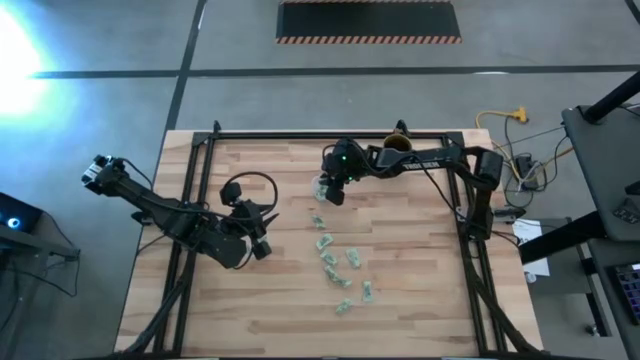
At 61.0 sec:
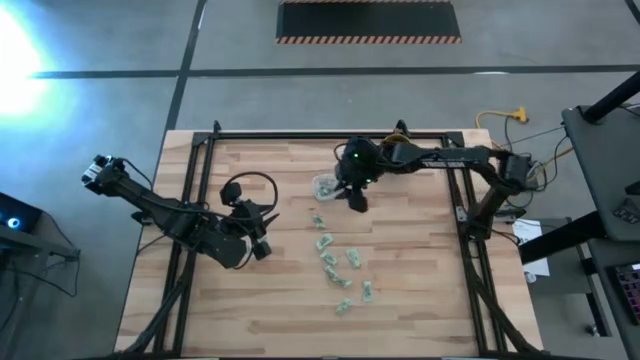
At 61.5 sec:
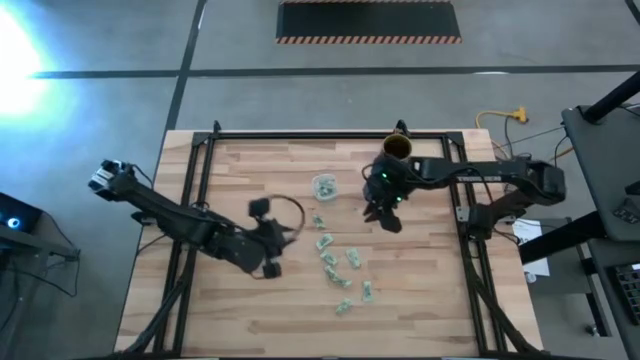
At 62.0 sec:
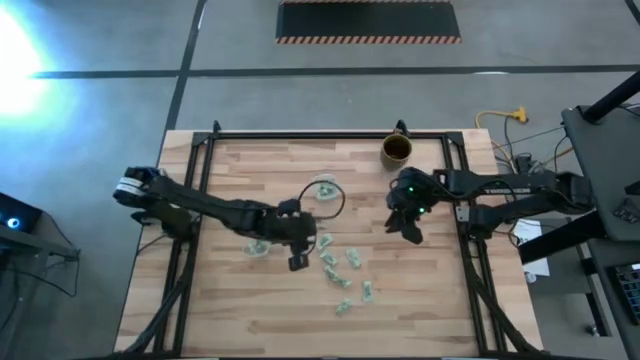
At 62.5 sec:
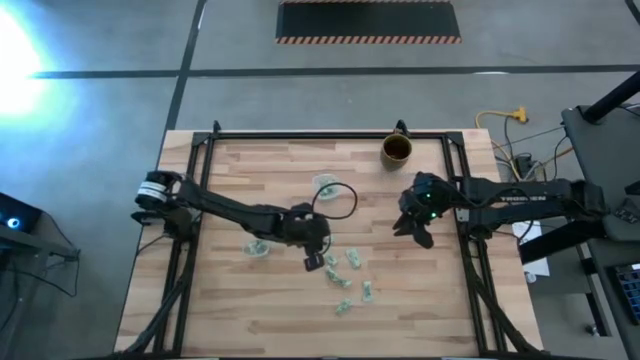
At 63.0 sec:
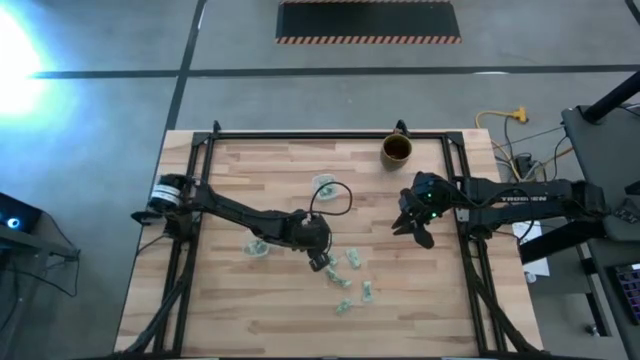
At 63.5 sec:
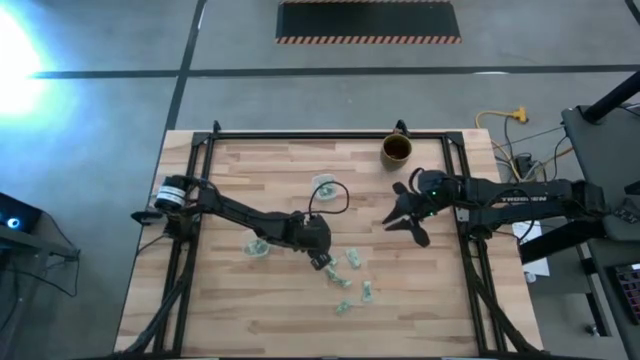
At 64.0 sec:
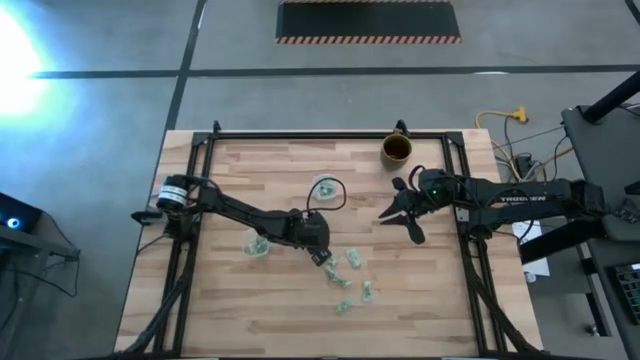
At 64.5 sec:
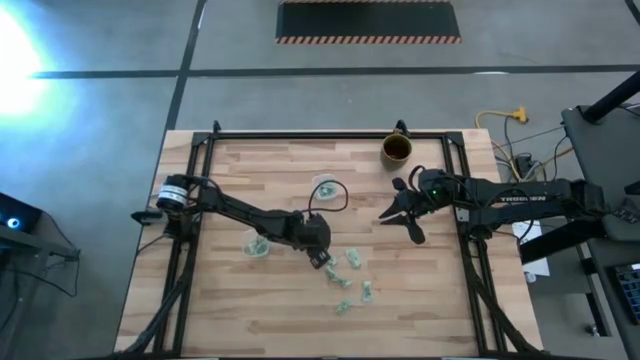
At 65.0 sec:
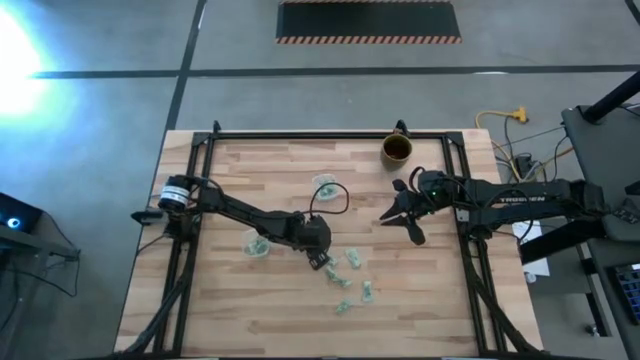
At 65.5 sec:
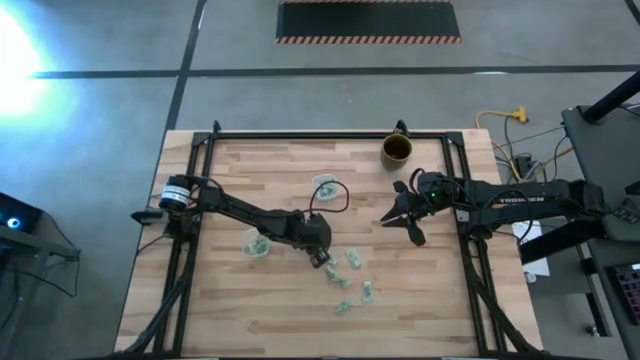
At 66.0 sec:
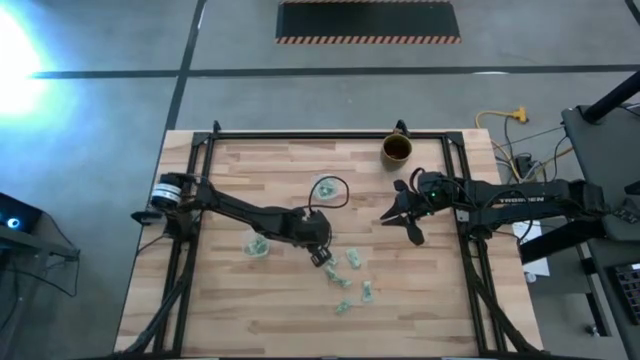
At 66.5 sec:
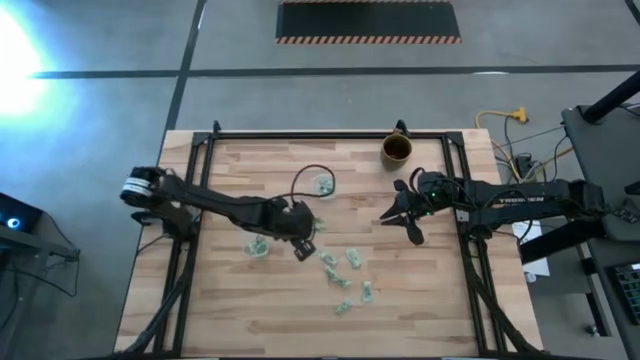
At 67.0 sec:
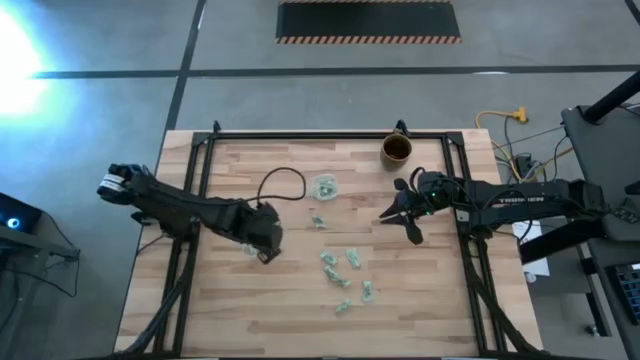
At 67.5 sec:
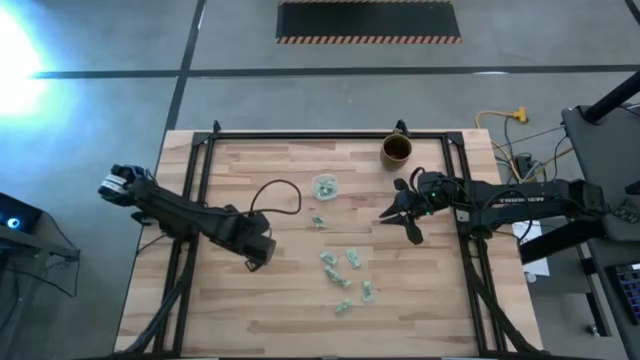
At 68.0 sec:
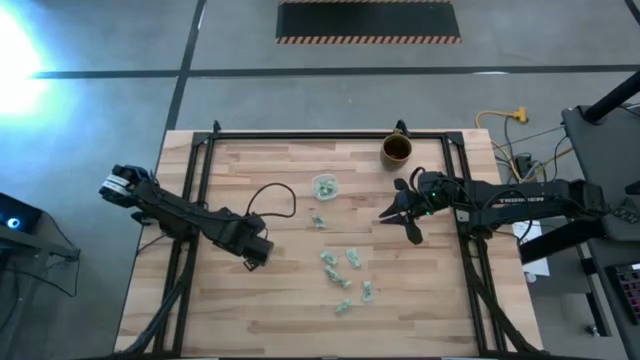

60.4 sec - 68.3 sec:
Task: Pick and place Stevia / Truvia into bins
Put the stevia packet into the bottom transparent container

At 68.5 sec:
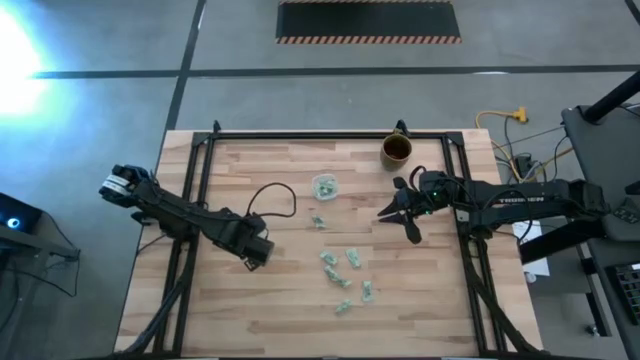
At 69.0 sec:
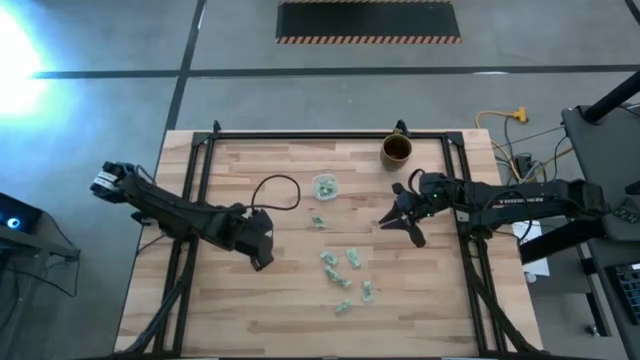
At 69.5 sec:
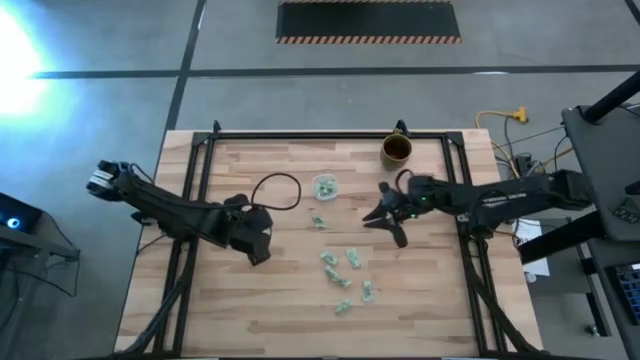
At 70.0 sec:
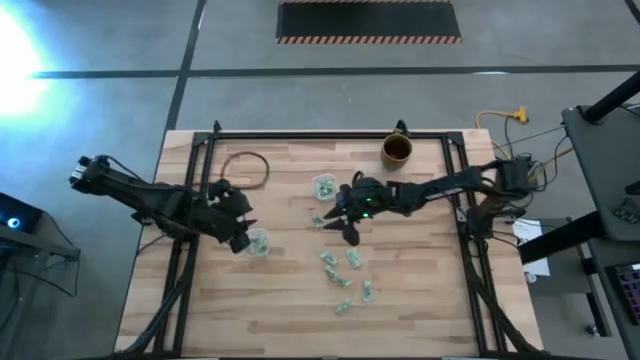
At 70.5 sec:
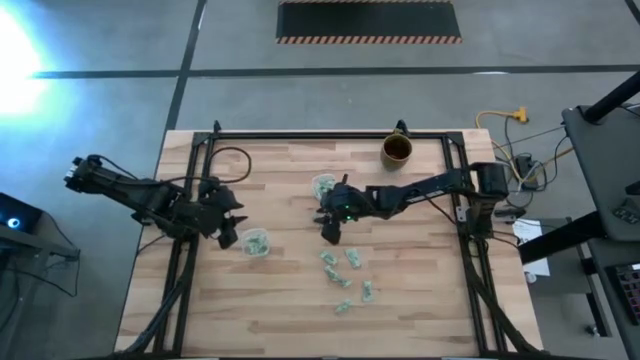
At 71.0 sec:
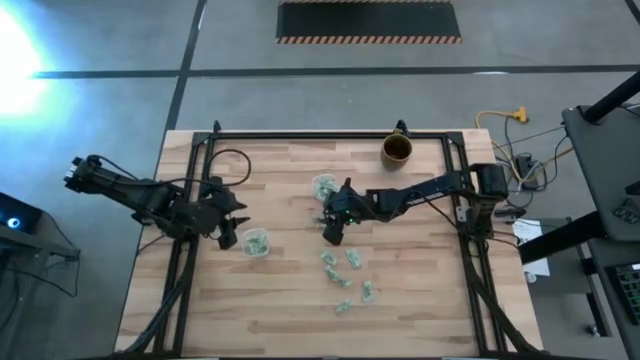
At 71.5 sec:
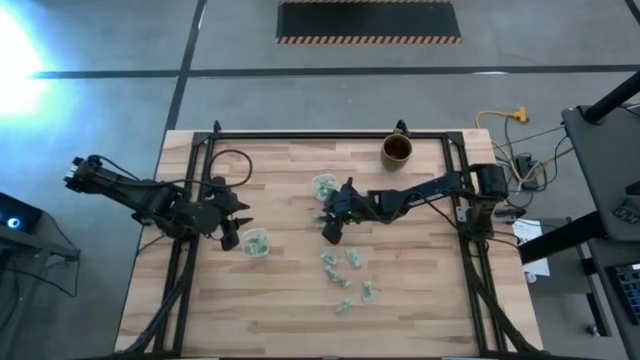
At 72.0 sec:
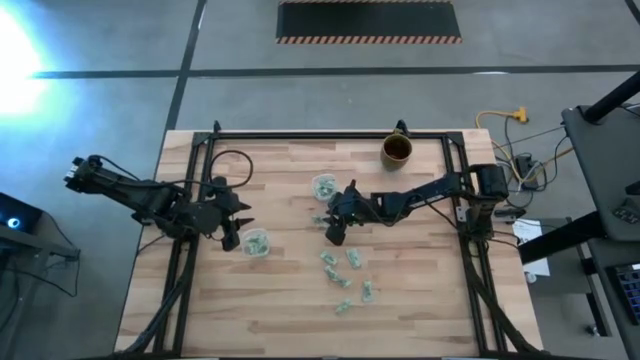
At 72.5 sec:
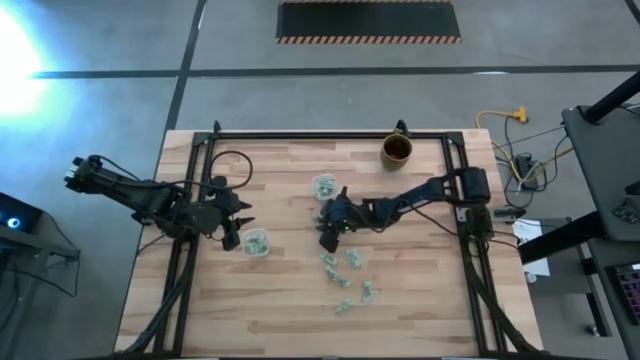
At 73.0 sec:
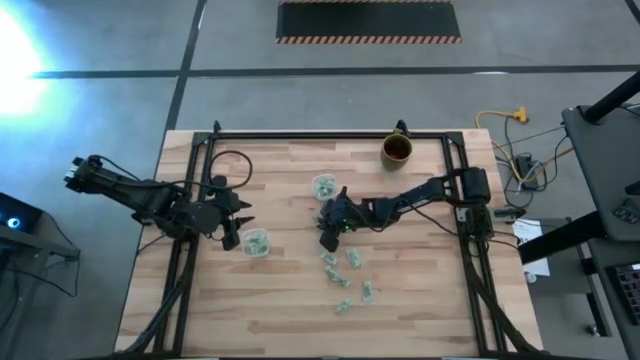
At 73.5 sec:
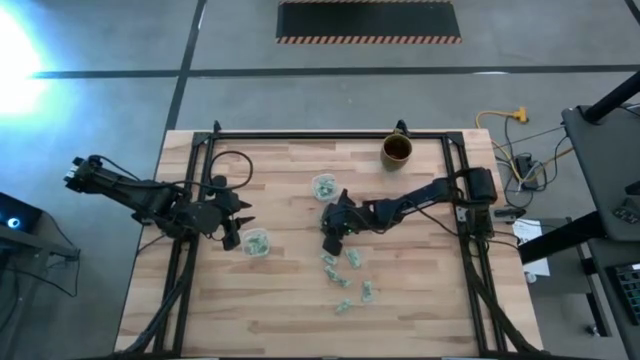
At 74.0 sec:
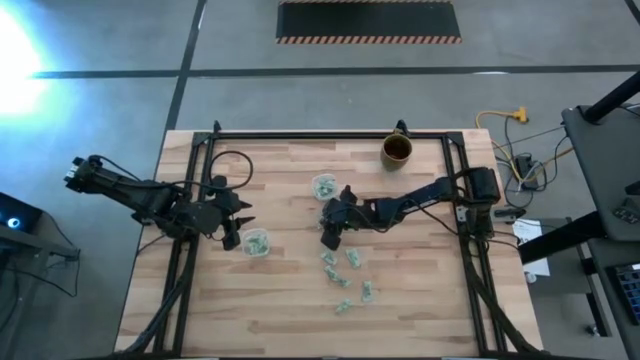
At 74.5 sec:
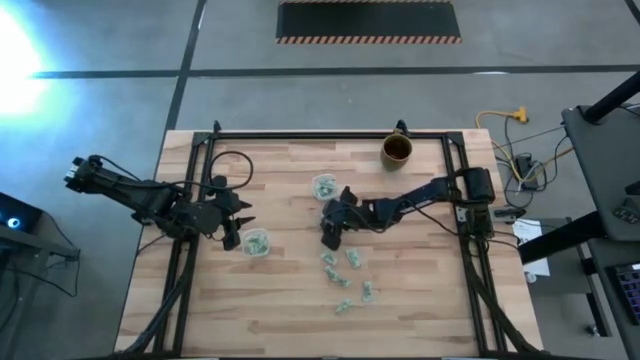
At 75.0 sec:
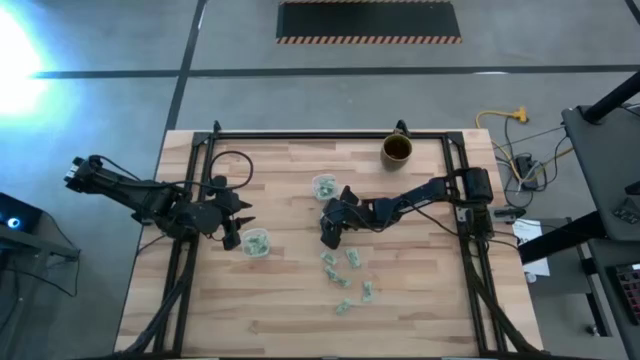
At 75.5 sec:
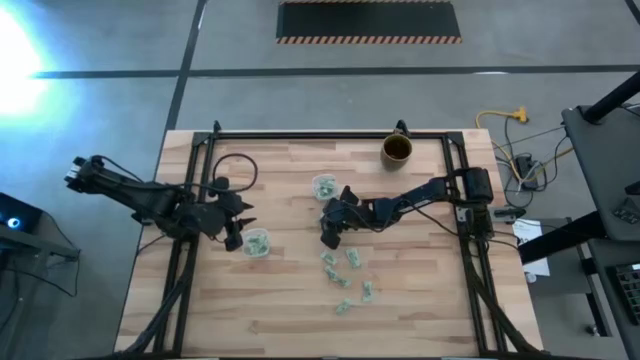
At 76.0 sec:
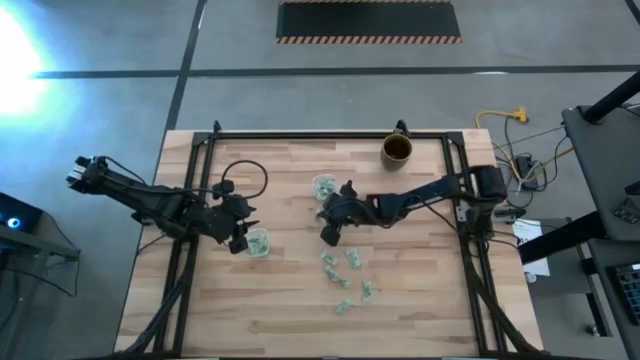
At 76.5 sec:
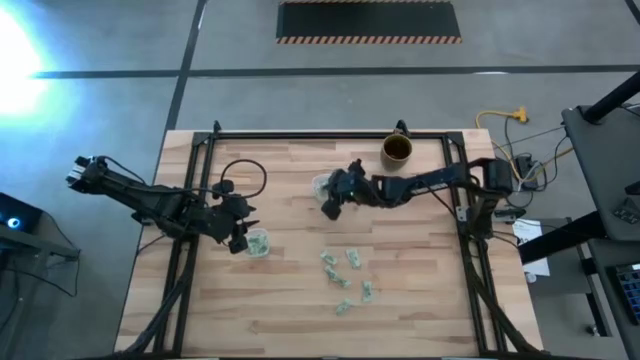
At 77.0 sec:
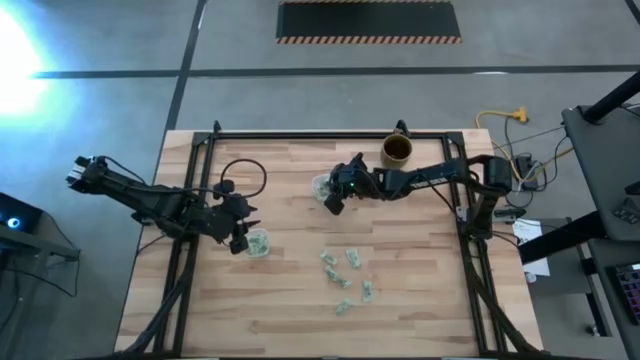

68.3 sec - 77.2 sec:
Put the stevia packet into the top transparent container

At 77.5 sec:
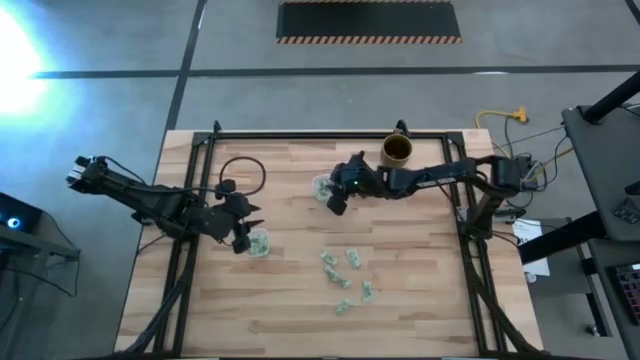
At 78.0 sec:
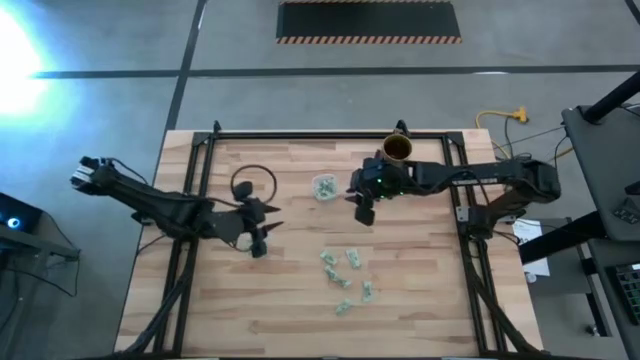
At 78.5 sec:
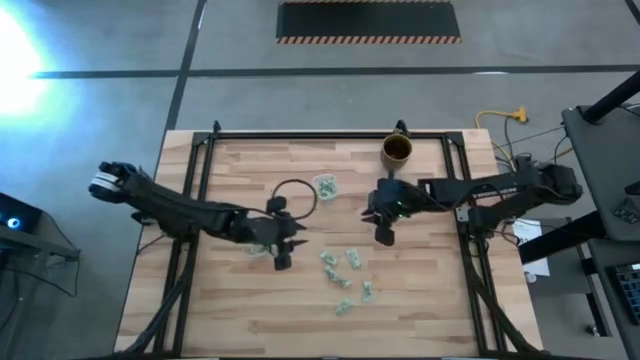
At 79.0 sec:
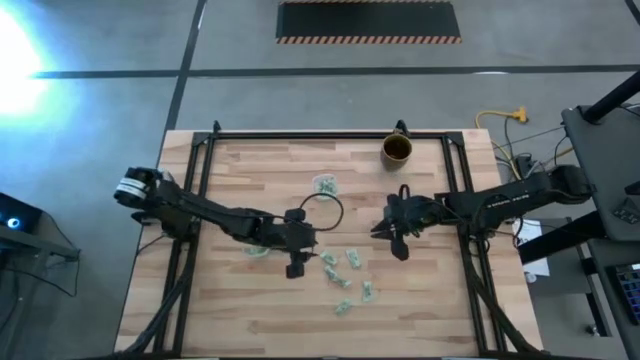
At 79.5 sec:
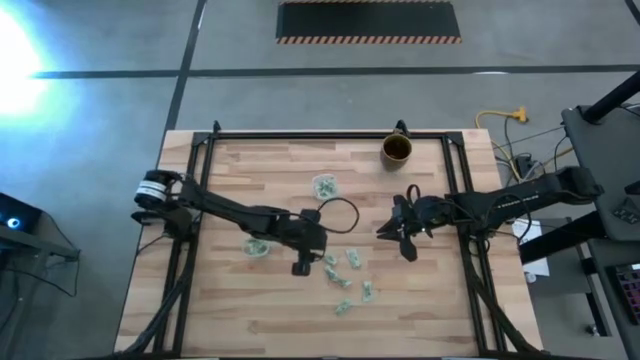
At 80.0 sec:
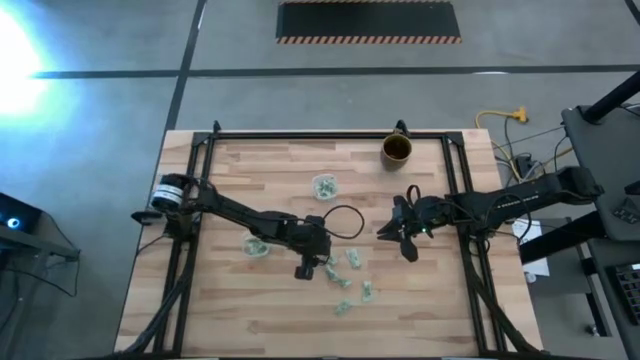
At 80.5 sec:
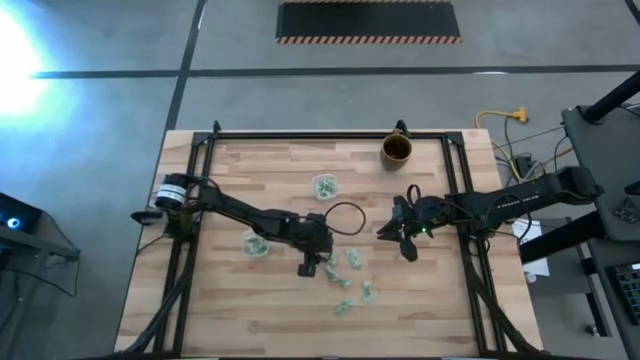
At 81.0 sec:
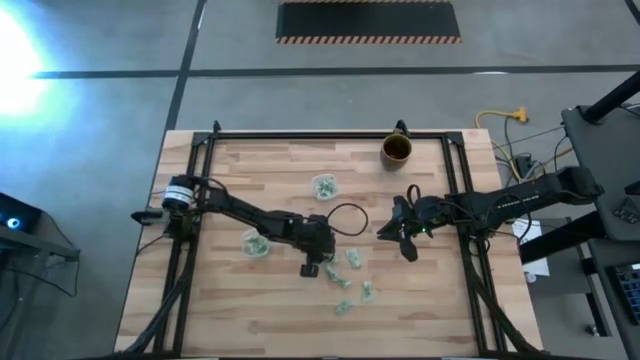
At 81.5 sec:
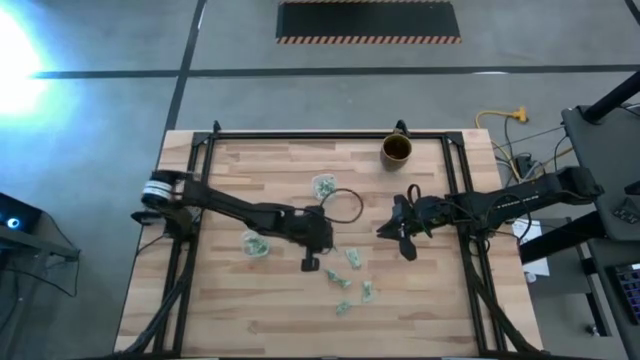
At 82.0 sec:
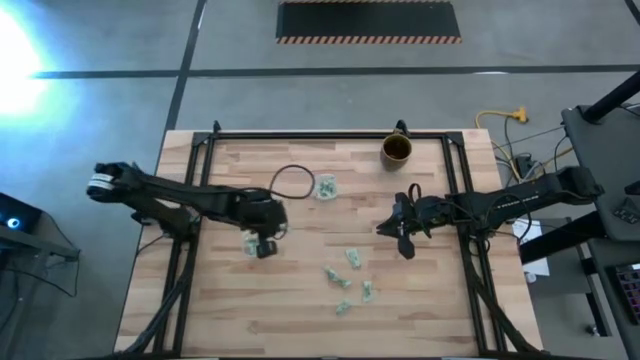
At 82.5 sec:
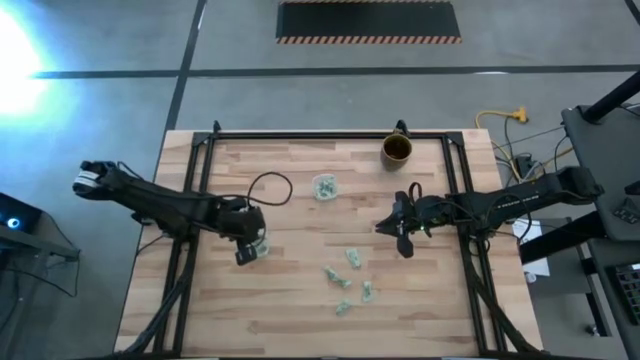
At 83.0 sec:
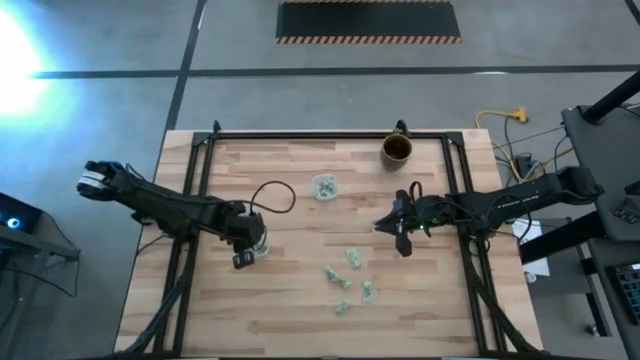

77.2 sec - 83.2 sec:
Put the stevia packet into the bottom transparent container
